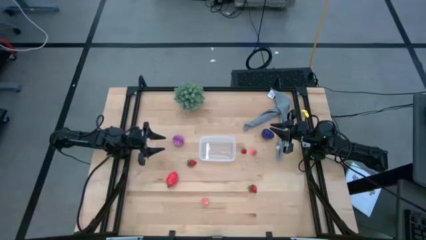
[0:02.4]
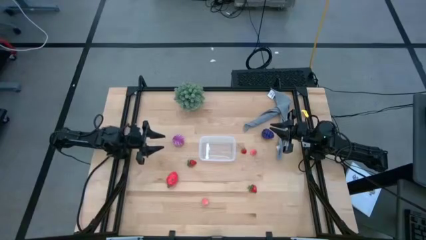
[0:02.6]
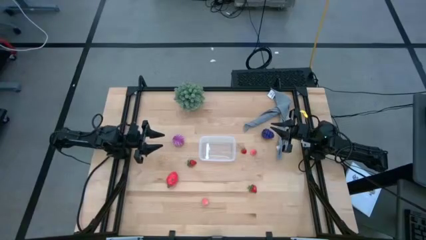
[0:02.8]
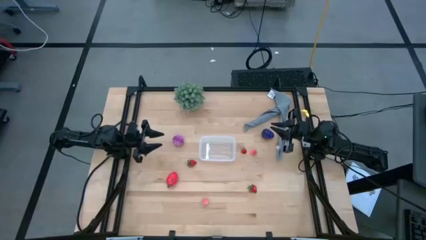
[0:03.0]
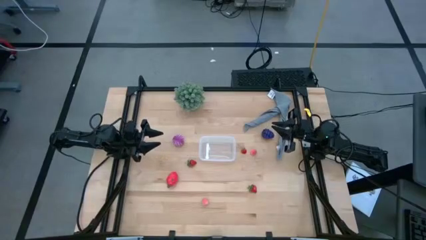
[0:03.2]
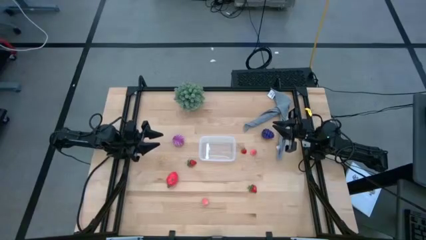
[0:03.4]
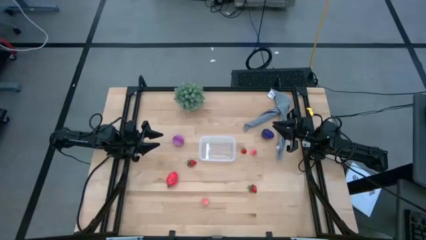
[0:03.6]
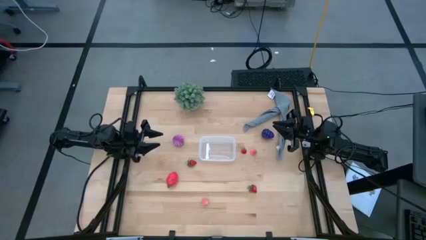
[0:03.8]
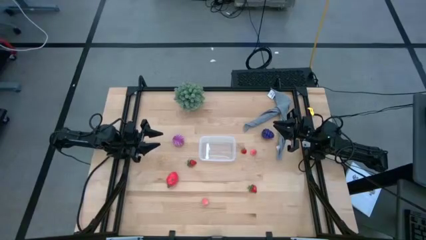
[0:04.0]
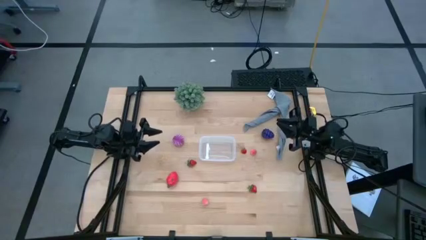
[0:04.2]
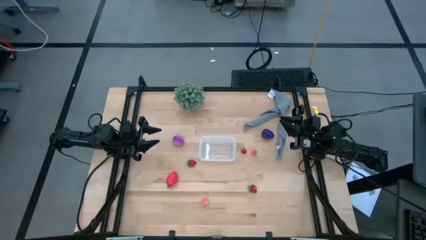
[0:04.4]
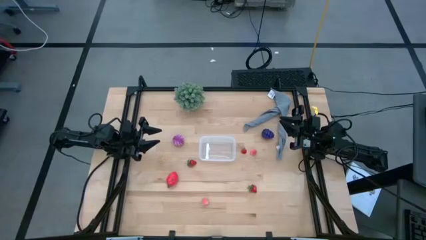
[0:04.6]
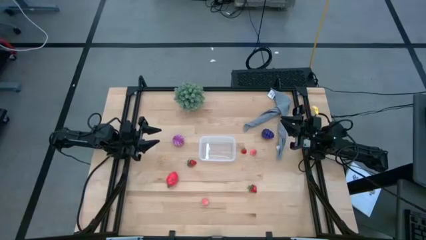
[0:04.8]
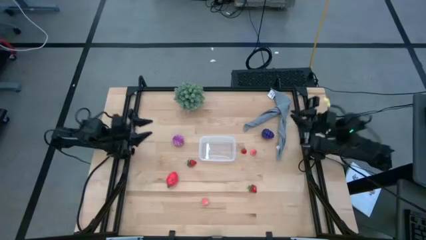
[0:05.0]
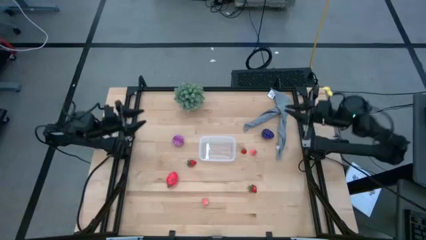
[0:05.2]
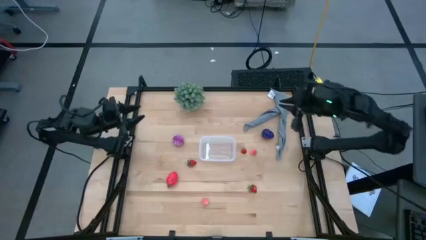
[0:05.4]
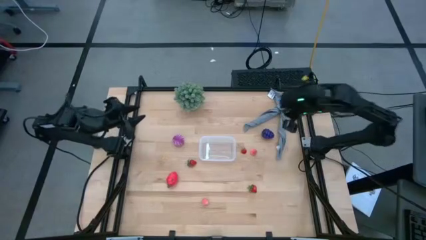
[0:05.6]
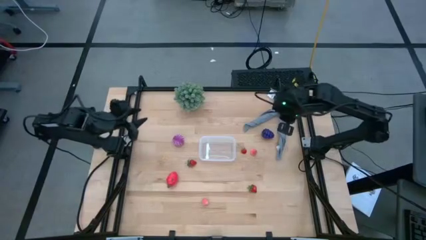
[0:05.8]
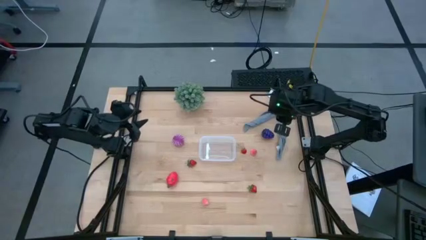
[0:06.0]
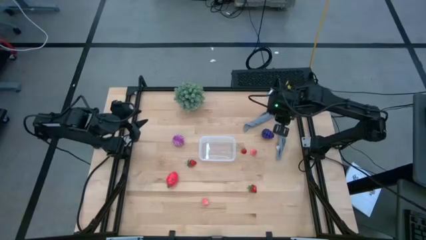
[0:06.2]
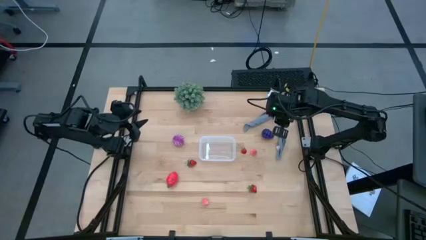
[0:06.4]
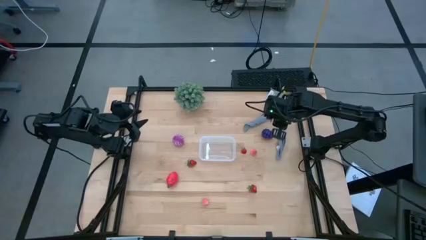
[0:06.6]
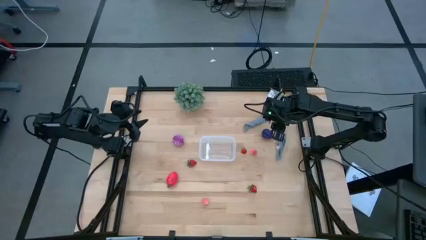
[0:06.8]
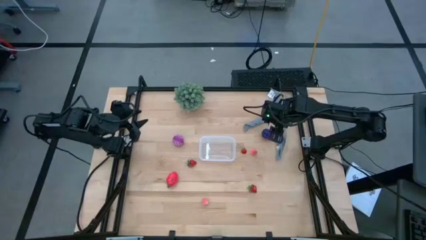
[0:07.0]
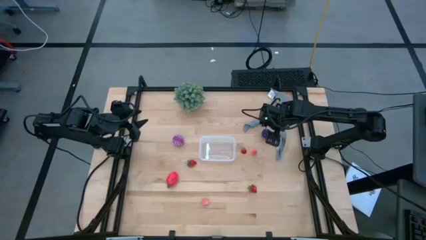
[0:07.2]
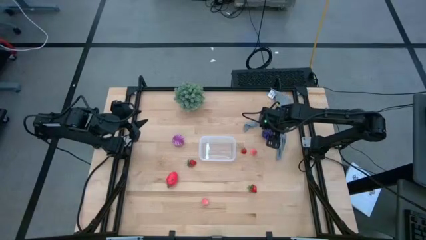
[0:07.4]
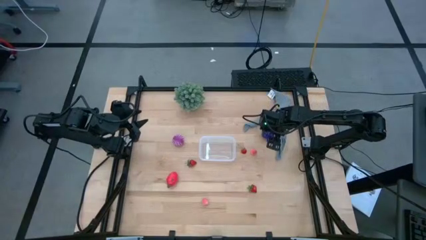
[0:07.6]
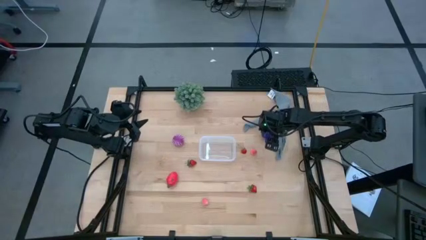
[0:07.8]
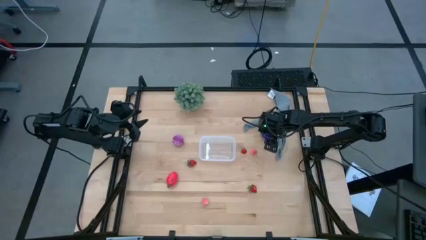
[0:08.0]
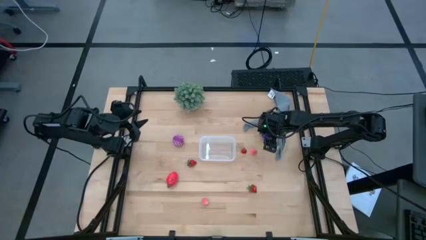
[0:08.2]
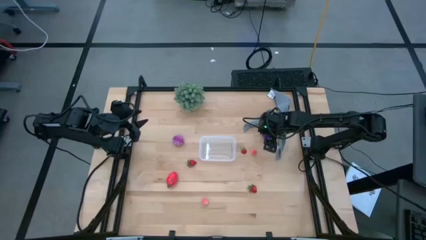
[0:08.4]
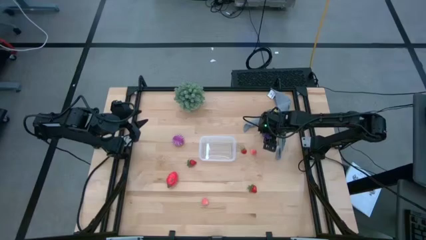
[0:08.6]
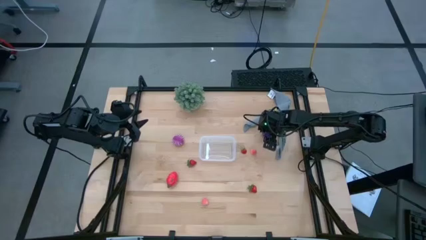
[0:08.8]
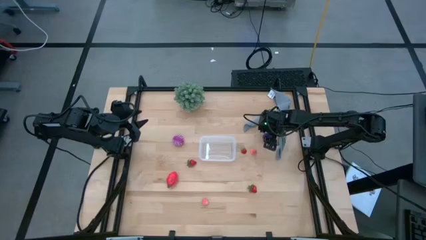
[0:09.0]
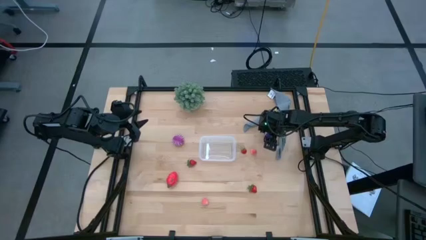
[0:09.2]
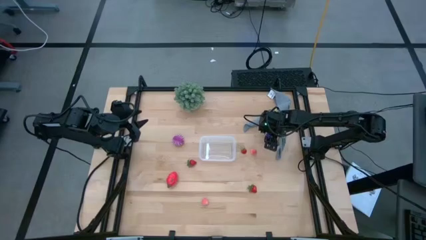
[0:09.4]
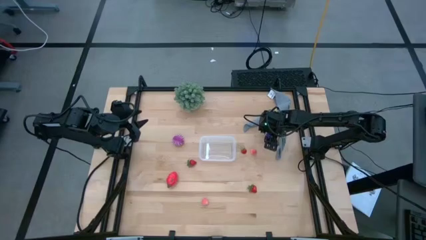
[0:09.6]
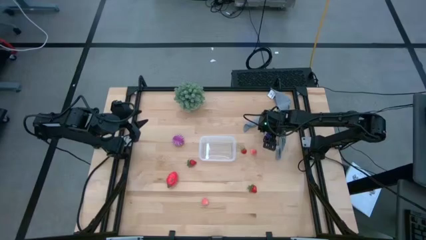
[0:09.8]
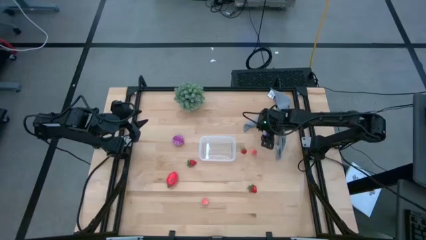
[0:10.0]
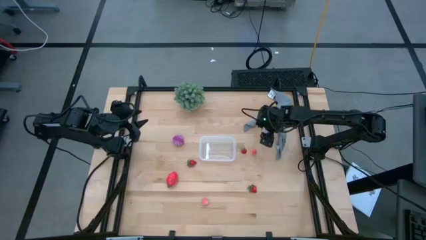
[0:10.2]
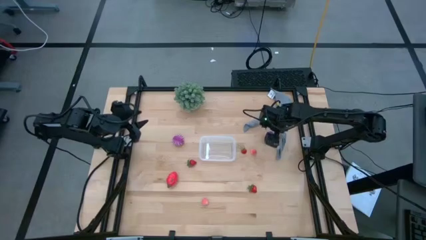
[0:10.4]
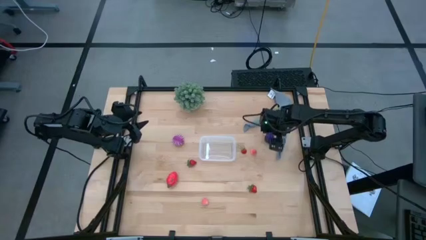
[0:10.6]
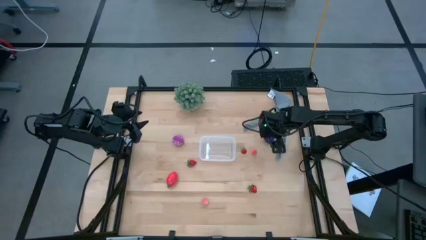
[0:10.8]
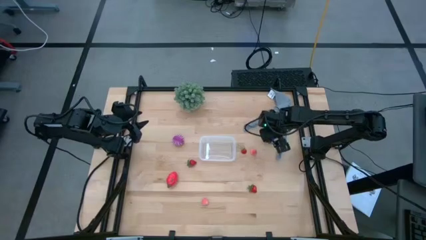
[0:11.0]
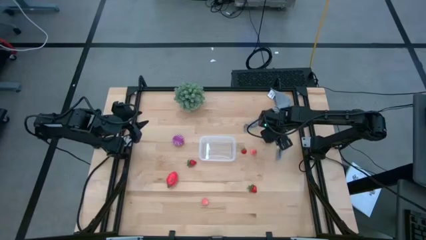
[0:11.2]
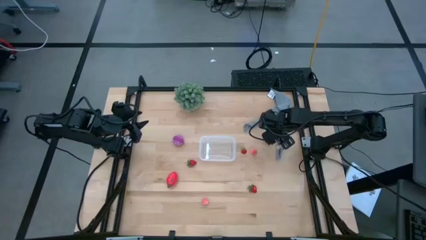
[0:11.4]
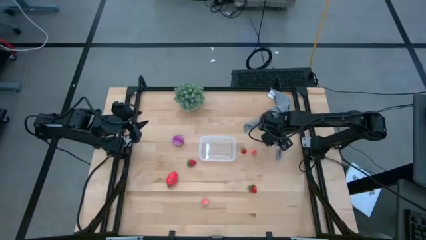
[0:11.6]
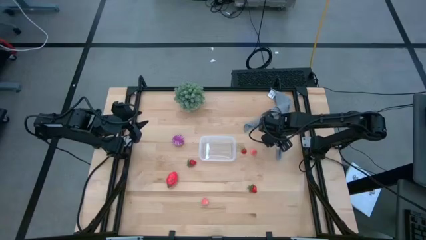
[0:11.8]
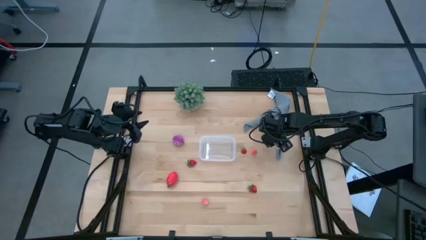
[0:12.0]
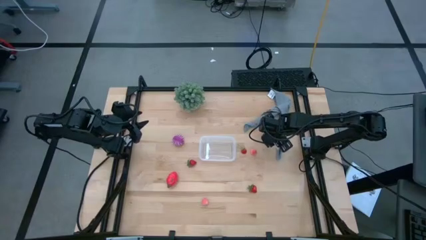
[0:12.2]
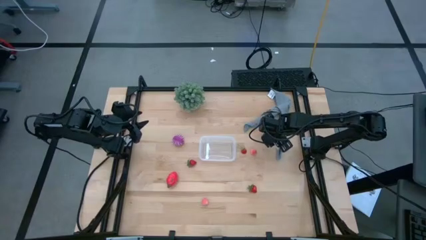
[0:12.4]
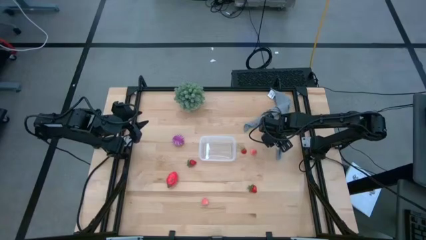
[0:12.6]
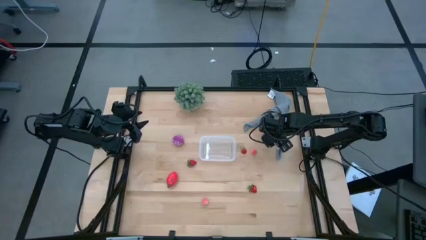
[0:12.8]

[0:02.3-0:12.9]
Task: Pick and placing Produce into tupperware
Put the grapes into the transparent container

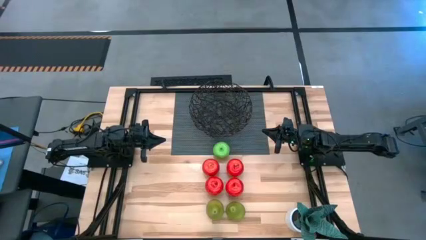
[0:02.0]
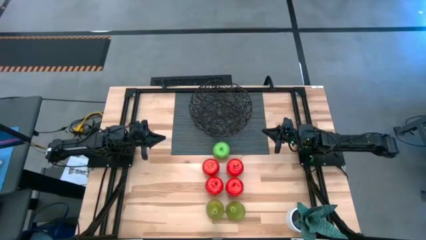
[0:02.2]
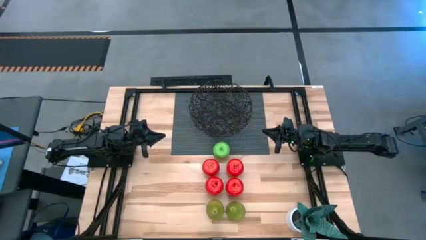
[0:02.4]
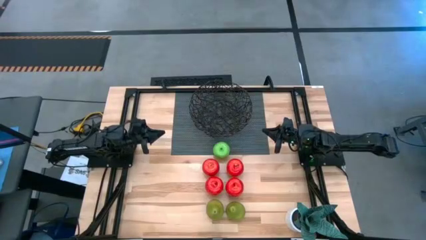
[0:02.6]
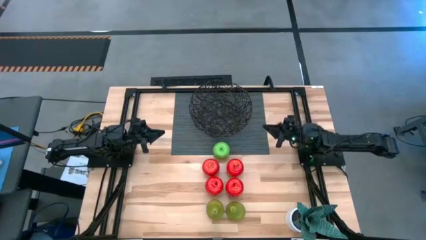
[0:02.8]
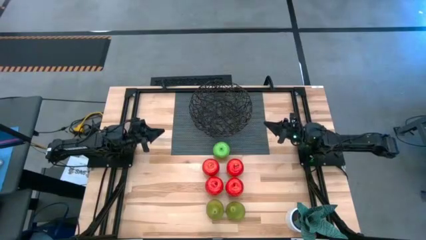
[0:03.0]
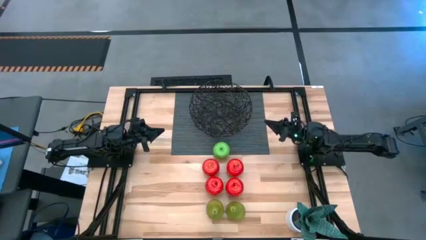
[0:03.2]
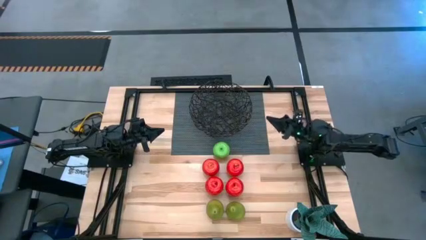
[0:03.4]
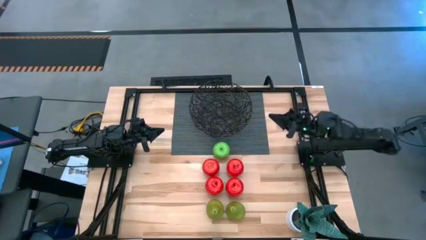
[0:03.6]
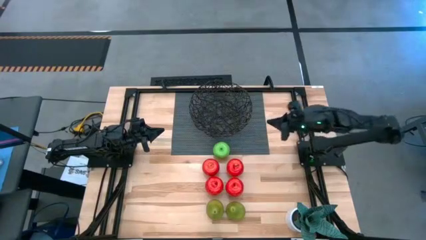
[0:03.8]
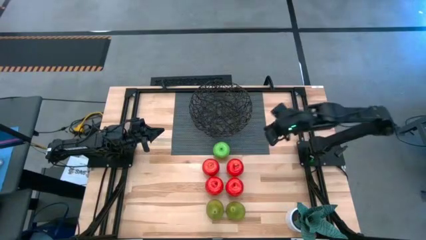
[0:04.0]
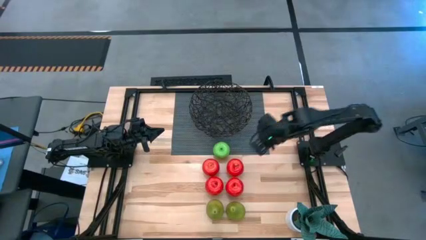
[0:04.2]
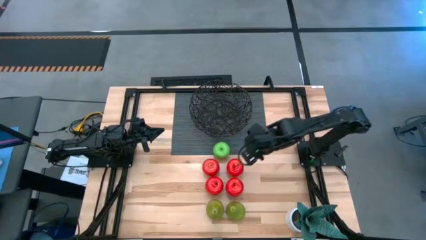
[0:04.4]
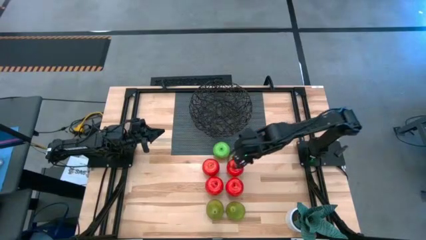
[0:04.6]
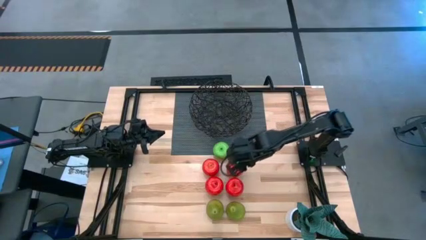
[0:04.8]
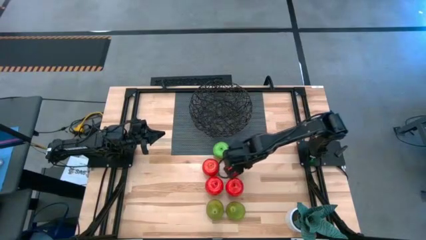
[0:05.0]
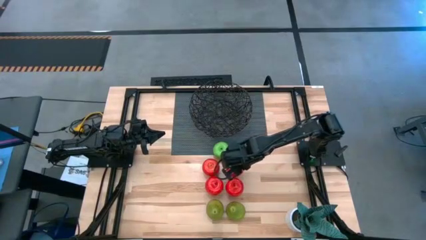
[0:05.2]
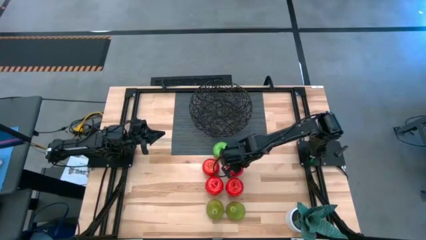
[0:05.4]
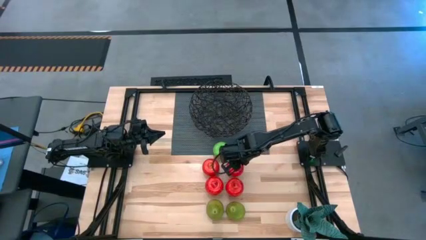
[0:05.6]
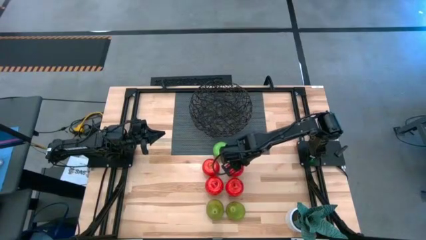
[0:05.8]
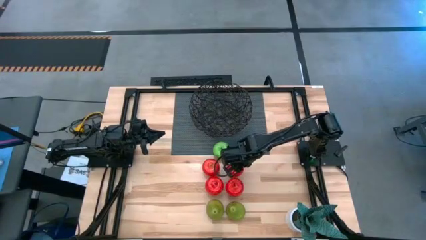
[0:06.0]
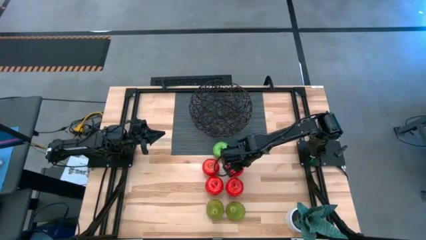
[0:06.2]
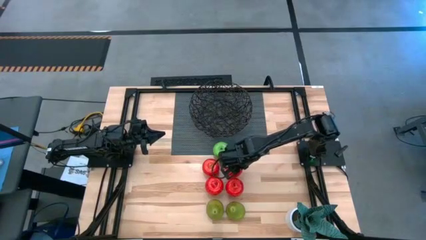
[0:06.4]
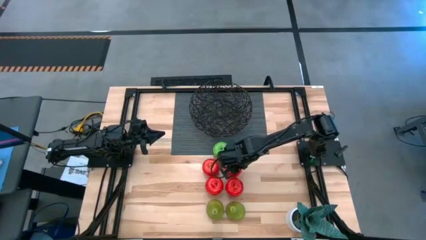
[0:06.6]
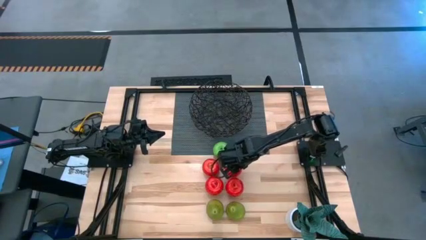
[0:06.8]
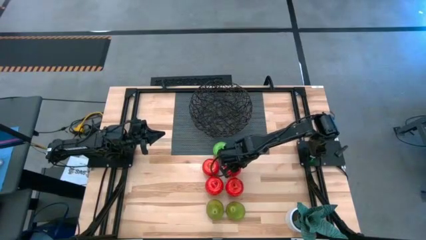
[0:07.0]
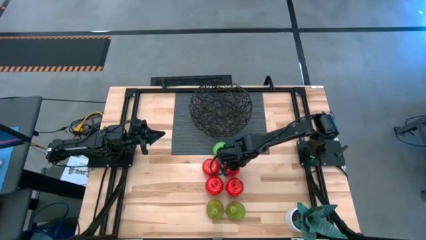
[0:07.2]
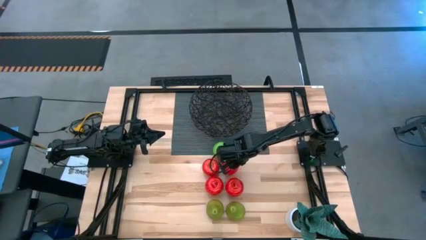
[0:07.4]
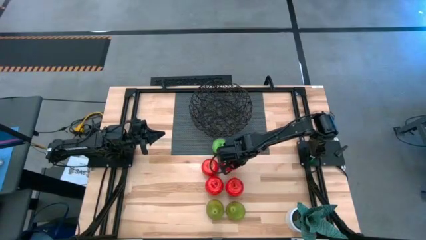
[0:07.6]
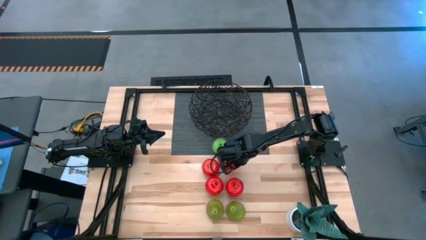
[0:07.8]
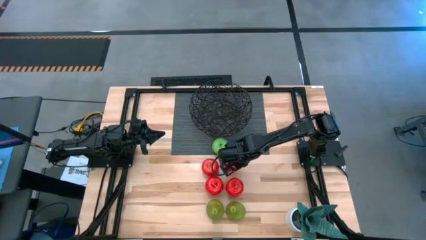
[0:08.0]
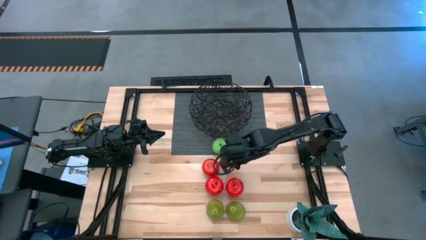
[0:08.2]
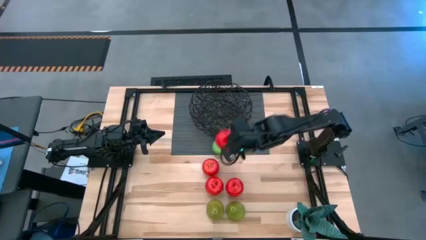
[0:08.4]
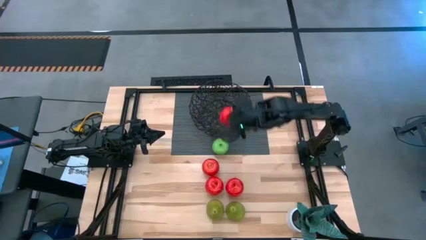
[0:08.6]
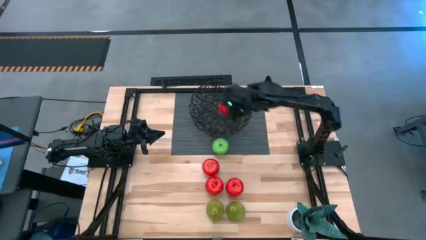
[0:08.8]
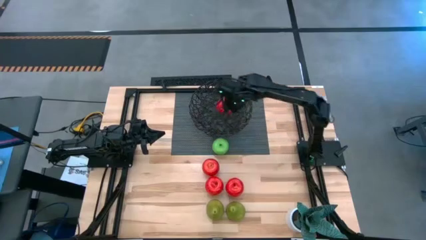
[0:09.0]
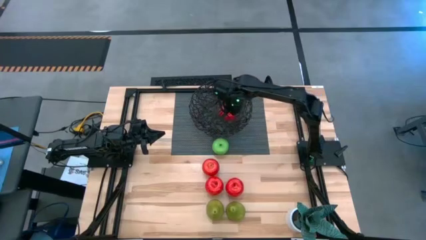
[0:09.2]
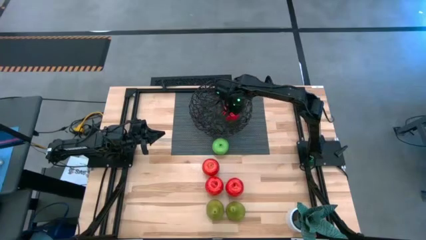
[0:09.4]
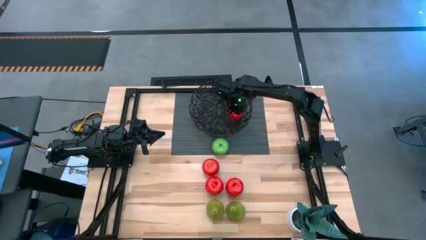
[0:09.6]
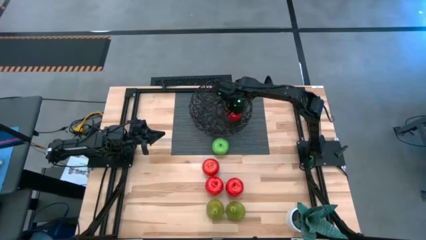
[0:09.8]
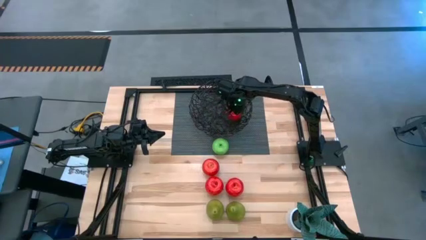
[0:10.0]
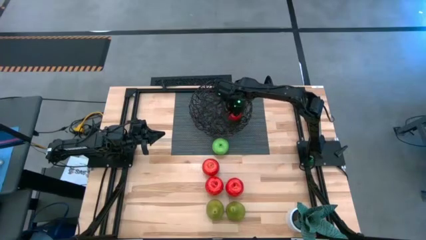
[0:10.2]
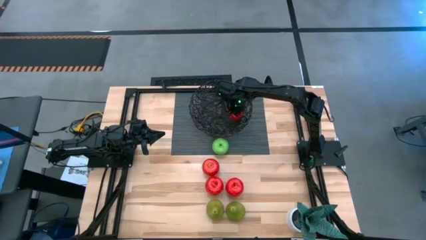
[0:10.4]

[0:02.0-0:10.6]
Task: Build produce basket
Put the red apple into the black basket
